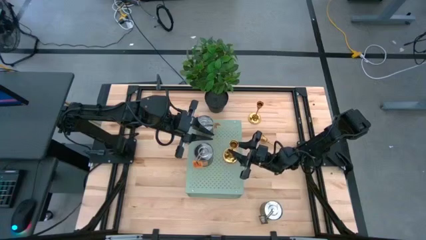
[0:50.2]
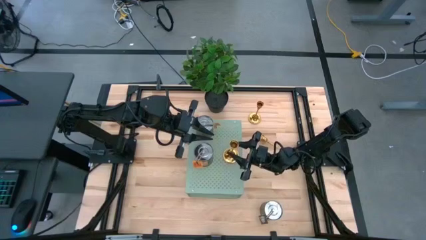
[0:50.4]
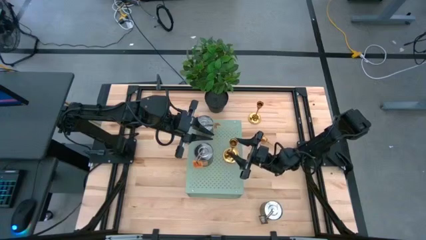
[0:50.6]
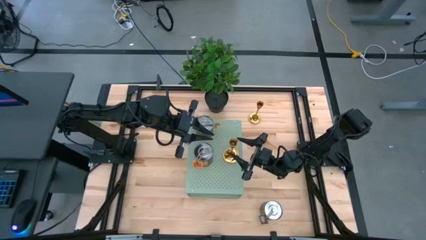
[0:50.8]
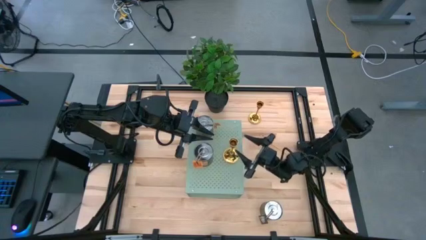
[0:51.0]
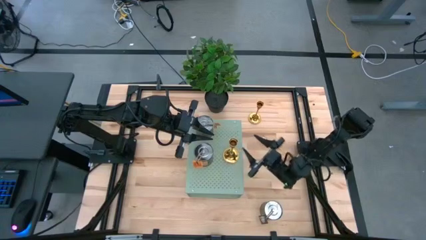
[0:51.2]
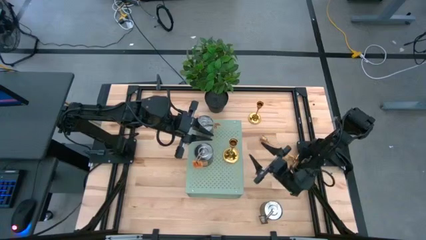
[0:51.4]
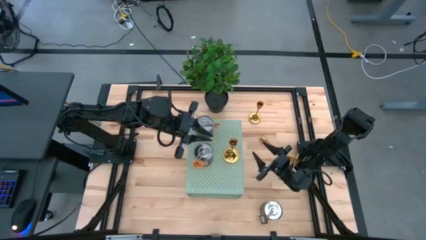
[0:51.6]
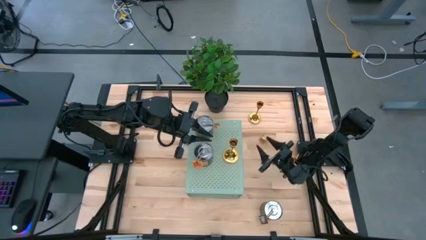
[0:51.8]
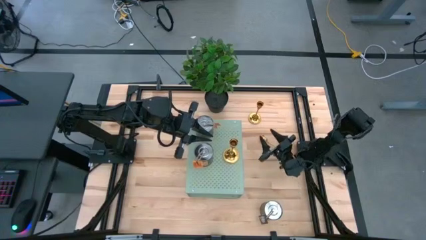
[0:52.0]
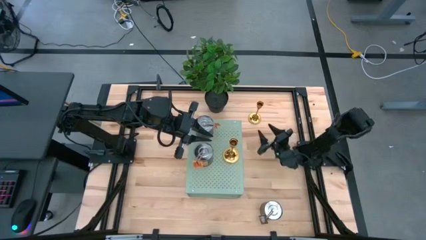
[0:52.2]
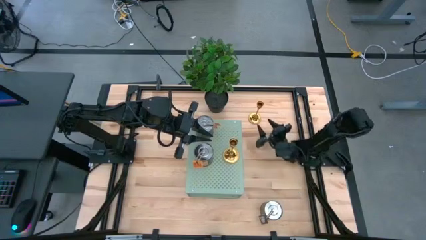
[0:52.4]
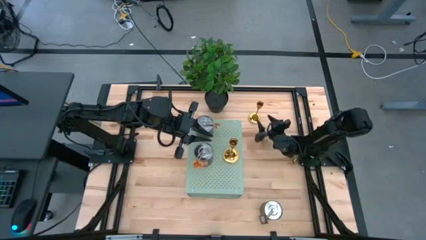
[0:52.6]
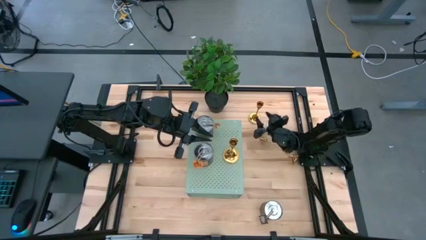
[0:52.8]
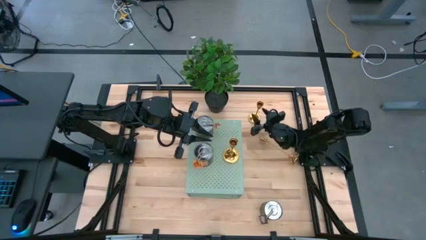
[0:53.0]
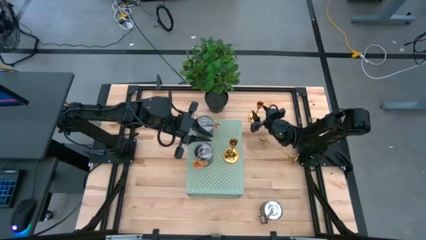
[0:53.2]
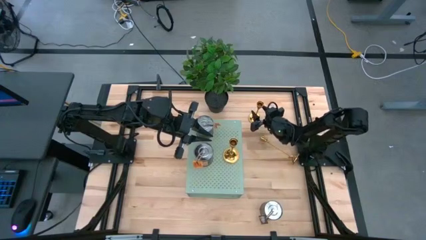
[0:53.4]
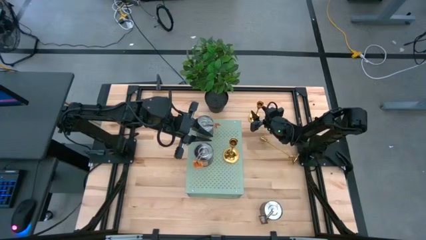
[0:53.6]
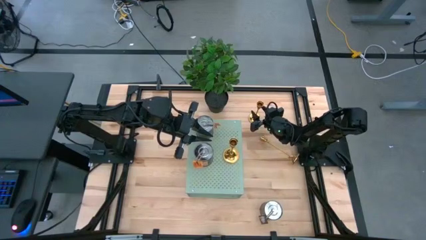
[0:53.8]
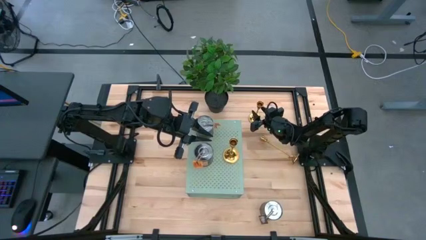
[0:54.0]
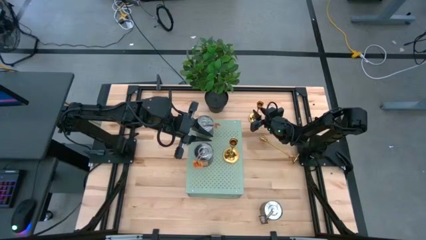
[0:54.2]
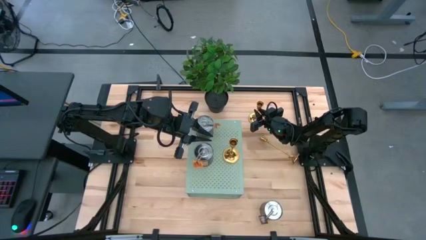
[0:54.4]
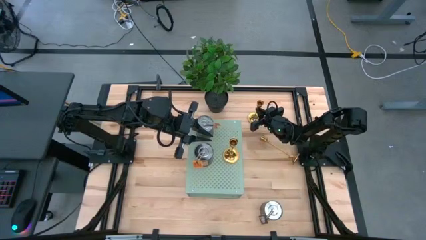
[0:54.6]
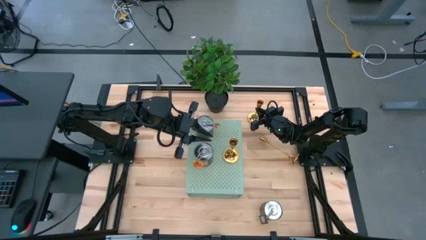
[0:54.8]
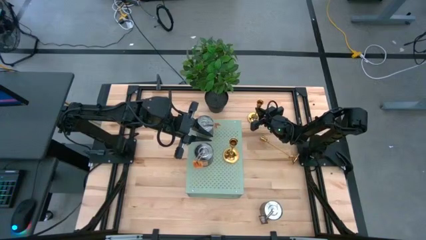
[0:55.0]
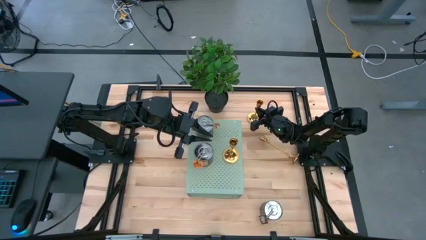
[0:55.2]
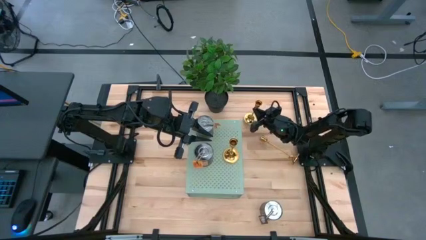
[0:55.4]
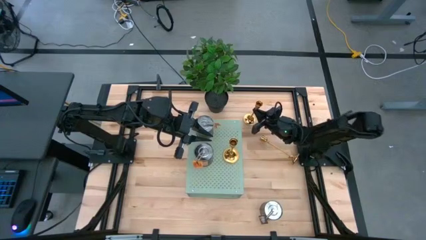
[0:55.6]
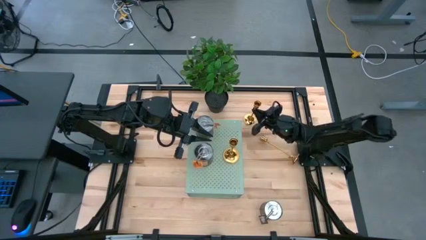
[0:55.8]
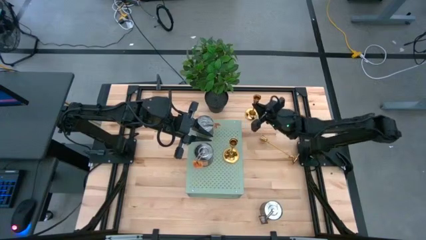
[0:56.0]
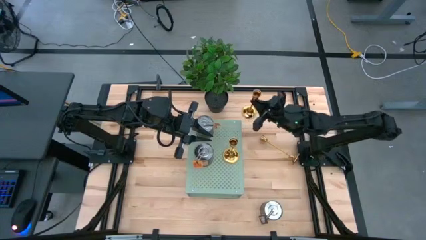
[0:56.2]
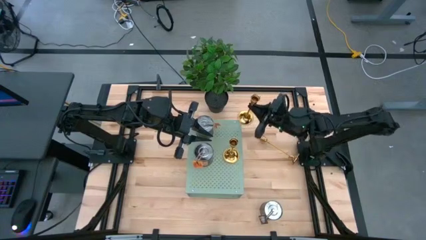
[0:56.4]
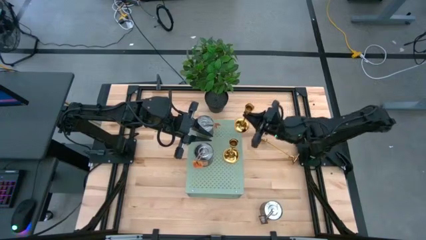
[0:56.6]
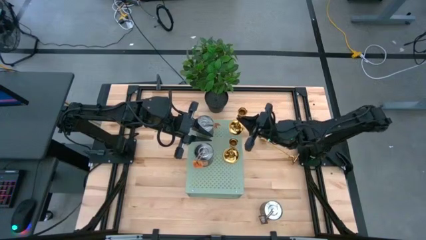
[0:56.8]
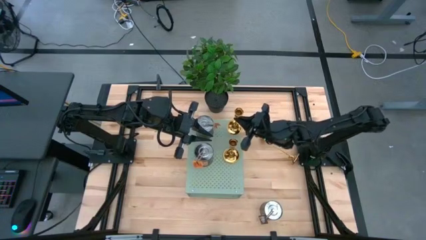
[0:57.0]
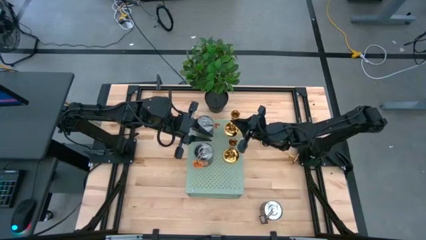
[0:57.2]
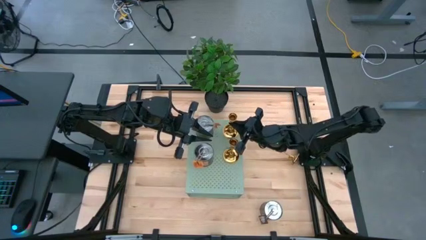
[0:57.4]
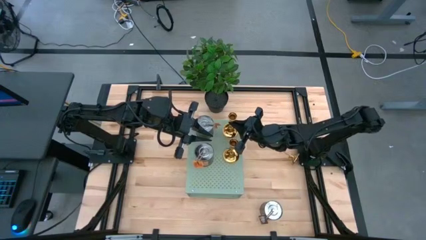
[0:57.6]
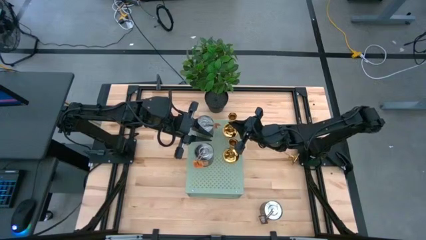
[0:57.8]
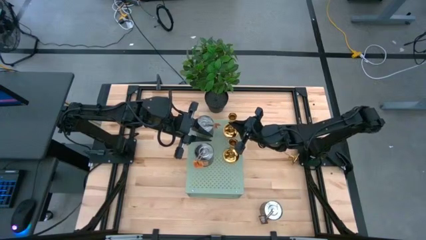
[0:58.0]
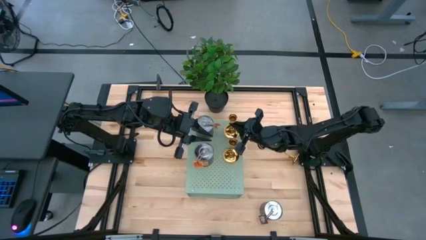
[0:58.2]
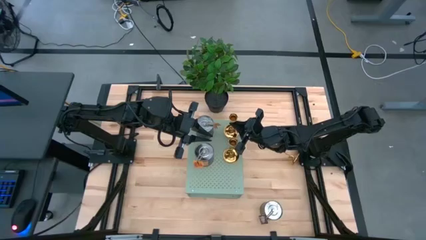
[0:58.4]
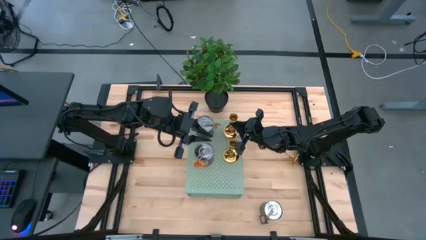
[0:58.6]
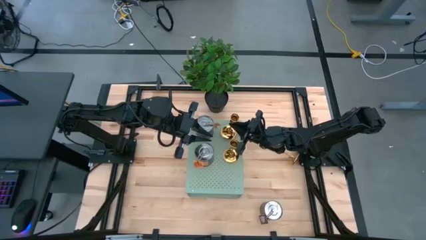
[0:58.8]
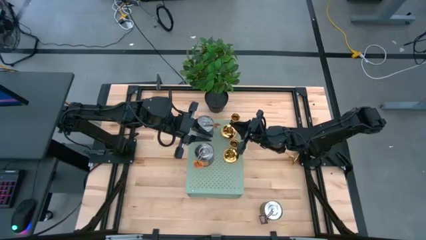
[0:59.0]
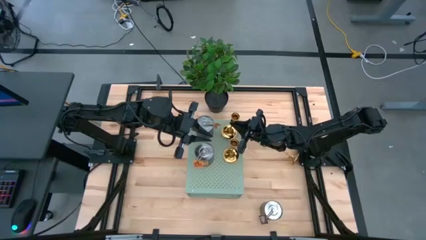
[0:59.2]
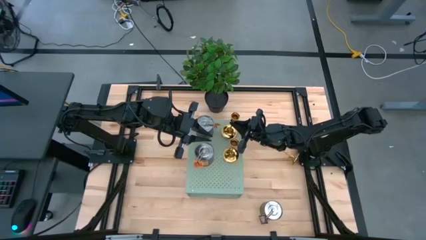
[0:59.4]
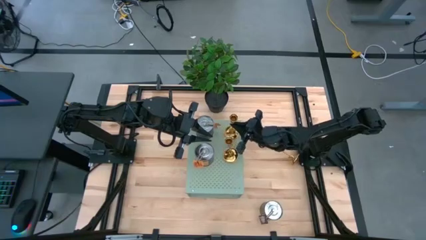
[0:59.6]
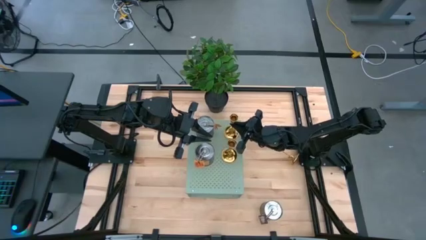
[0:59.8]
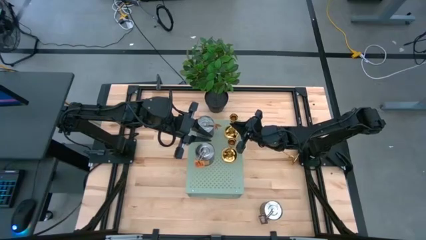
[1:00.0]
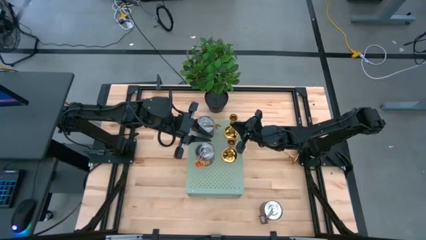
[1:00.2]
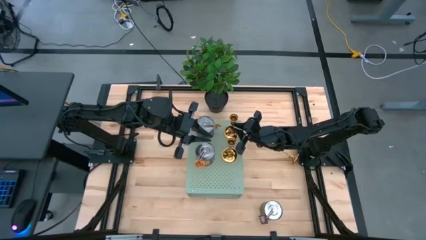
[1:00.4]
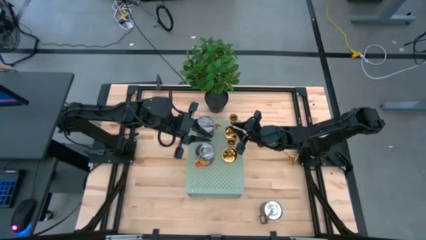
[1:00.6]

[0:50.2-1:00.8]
Task: Pick & Place candle stick holders
Align the top gold candle holder with the other gold candle holder on the shelf
